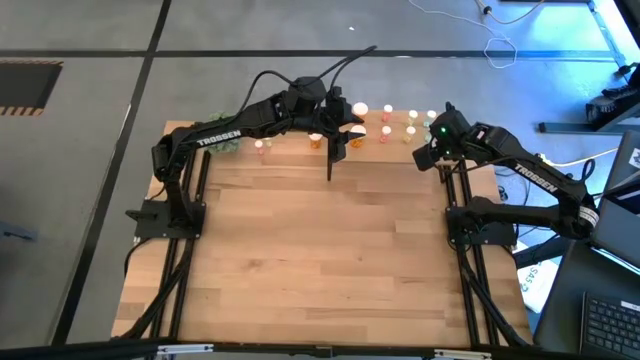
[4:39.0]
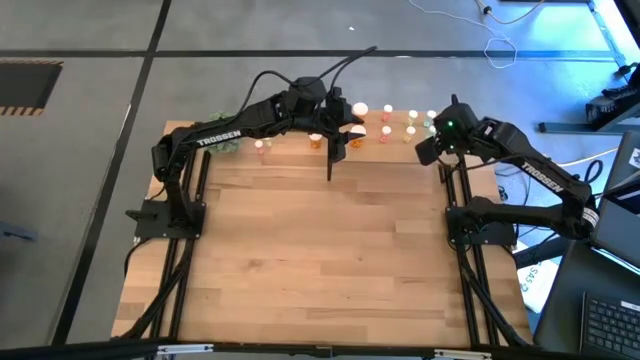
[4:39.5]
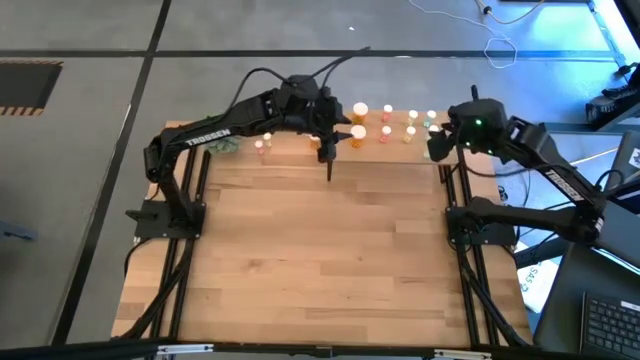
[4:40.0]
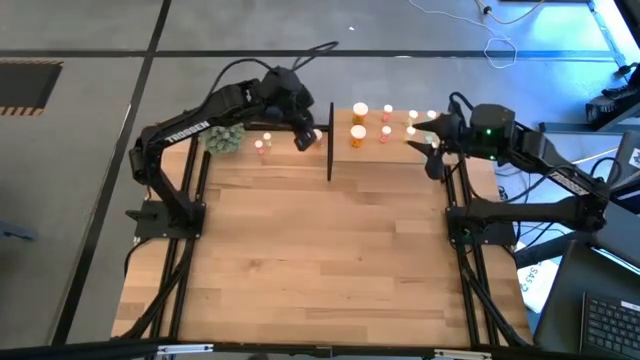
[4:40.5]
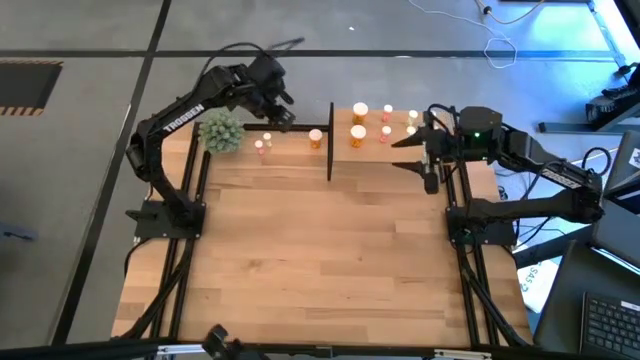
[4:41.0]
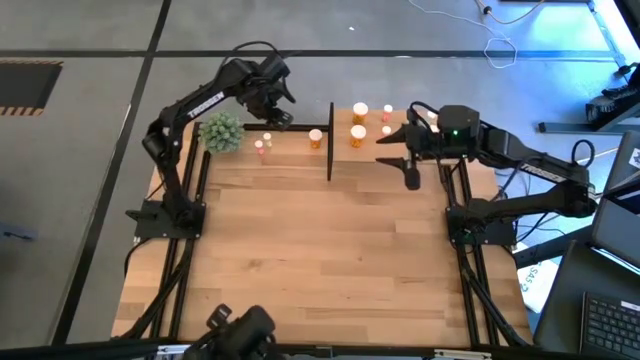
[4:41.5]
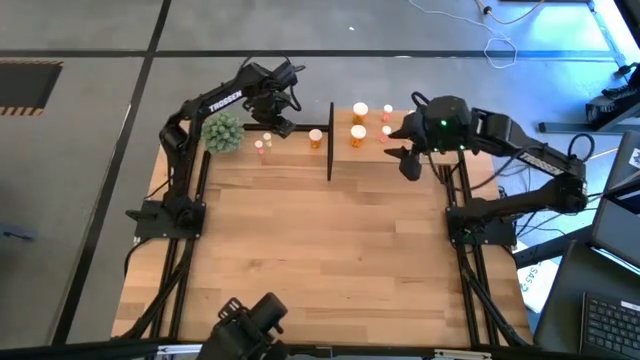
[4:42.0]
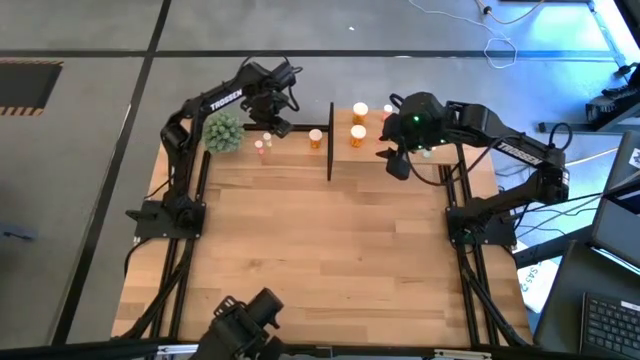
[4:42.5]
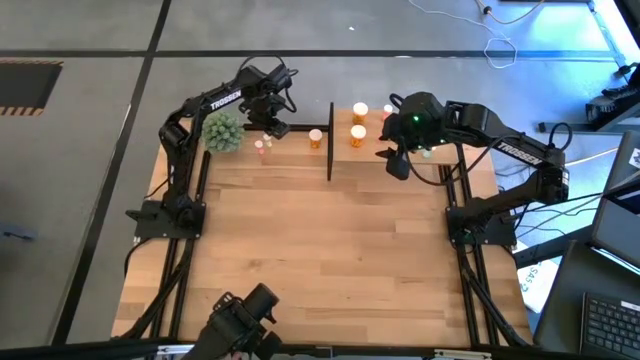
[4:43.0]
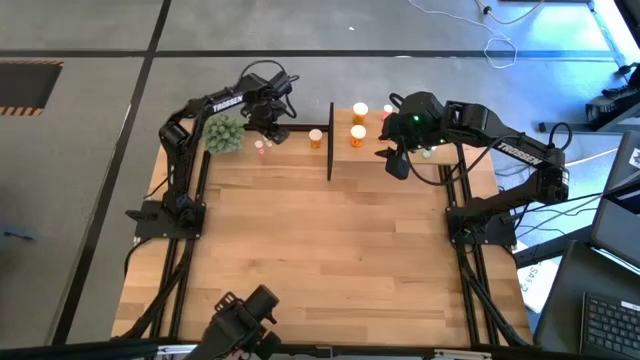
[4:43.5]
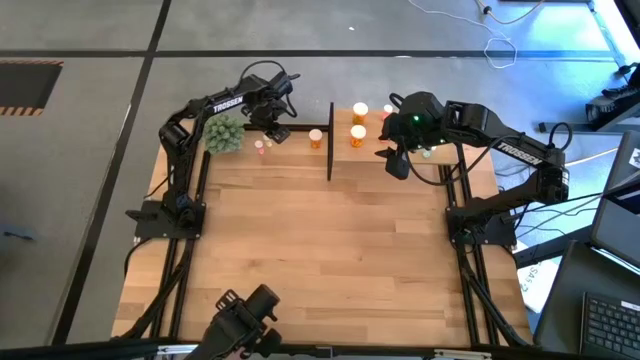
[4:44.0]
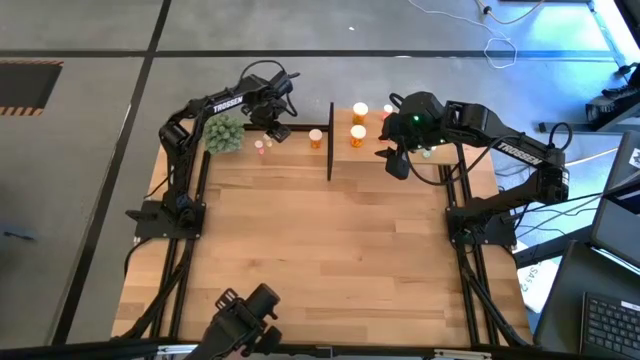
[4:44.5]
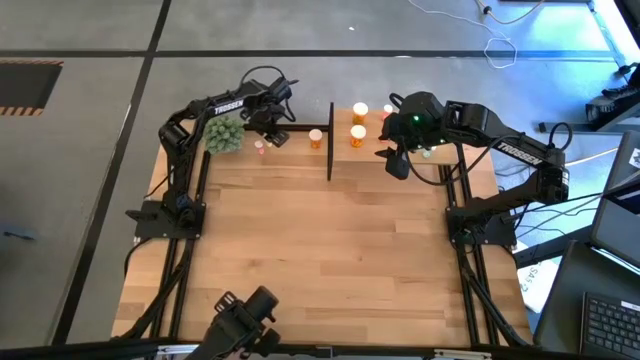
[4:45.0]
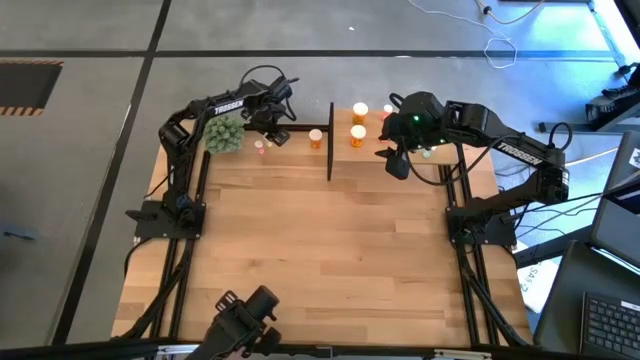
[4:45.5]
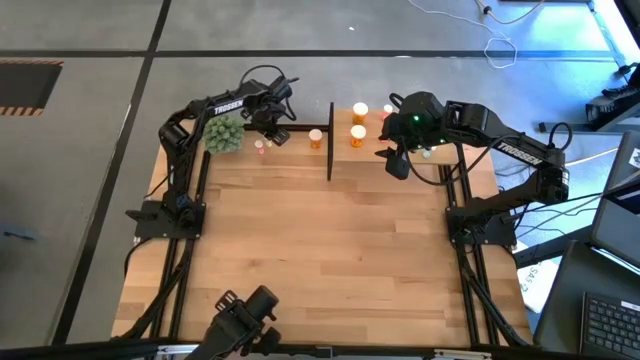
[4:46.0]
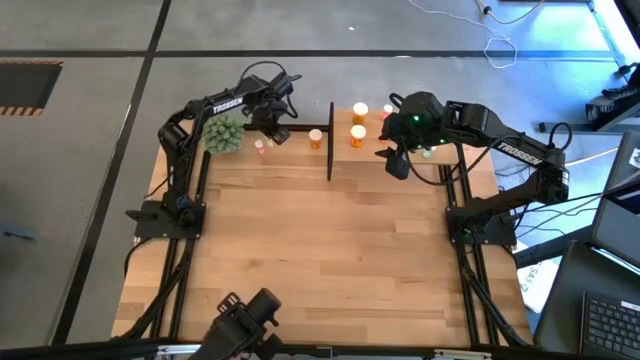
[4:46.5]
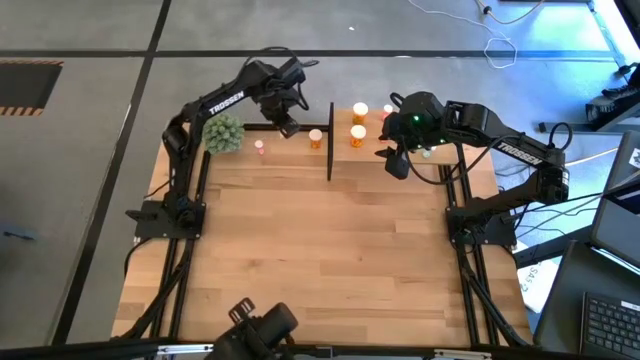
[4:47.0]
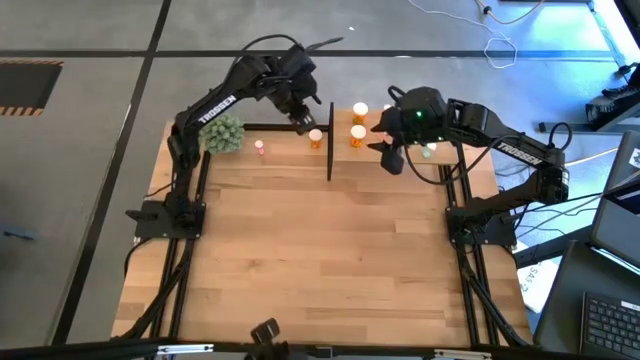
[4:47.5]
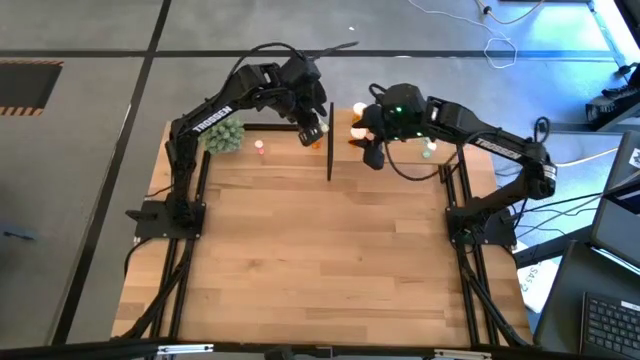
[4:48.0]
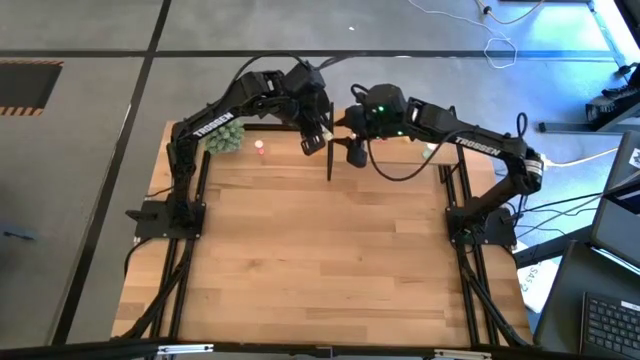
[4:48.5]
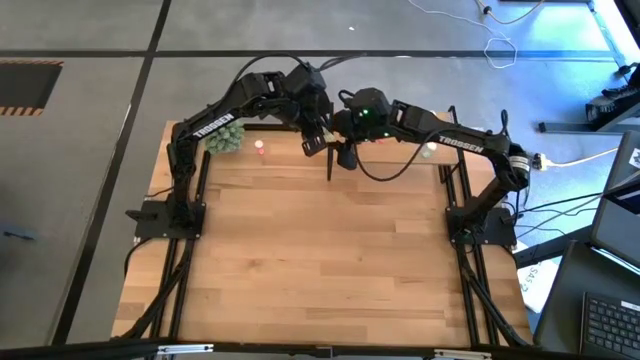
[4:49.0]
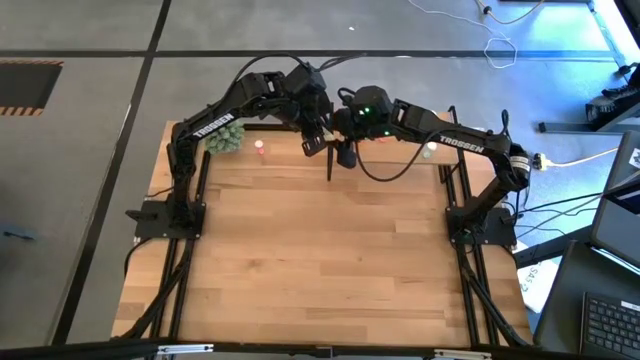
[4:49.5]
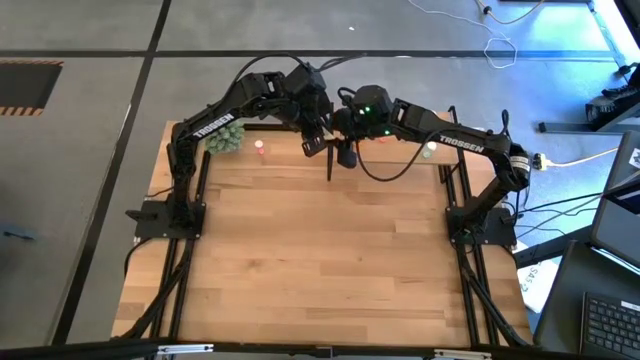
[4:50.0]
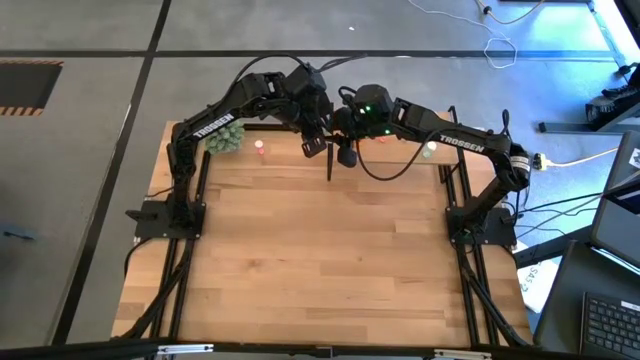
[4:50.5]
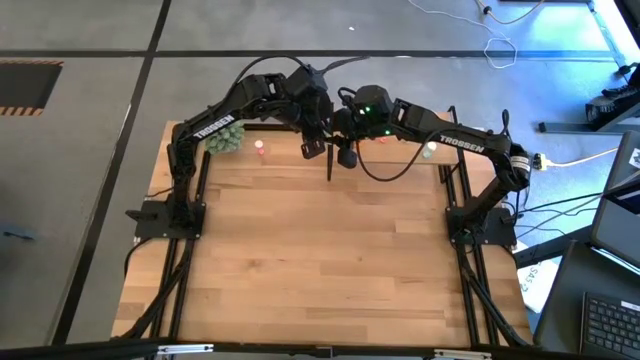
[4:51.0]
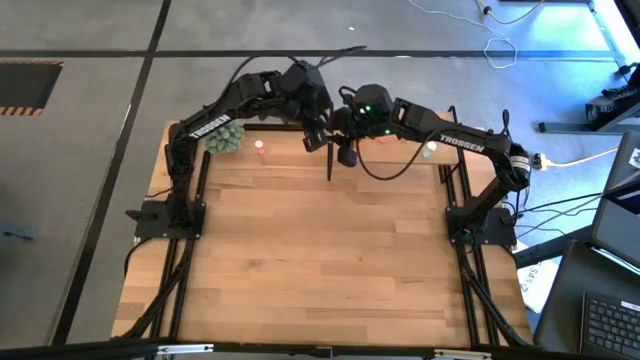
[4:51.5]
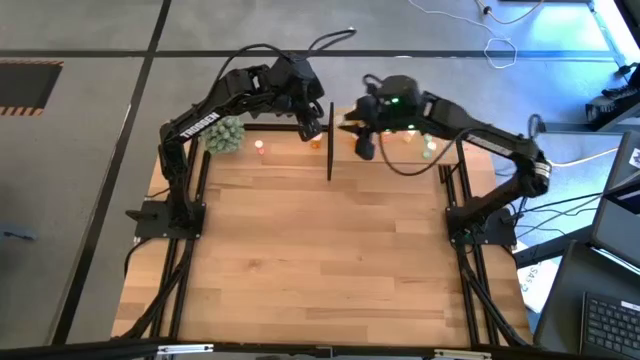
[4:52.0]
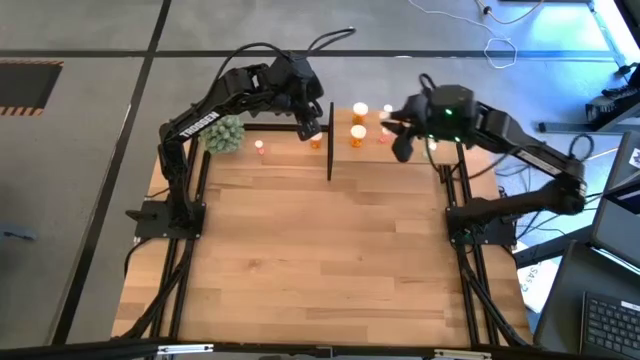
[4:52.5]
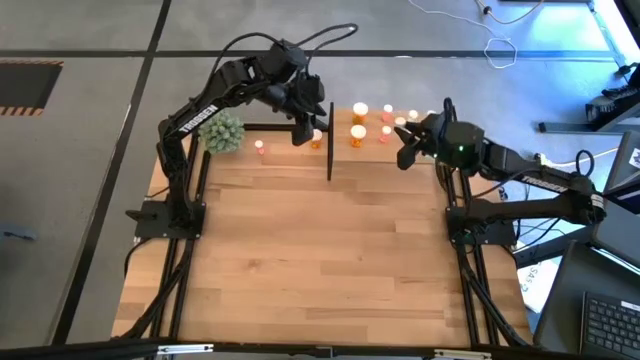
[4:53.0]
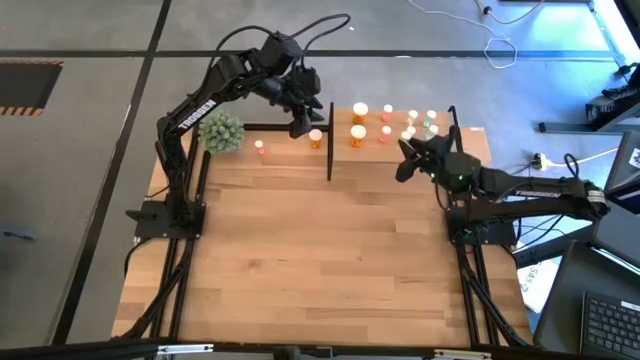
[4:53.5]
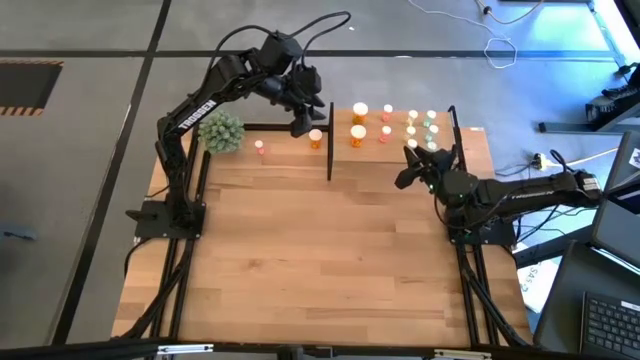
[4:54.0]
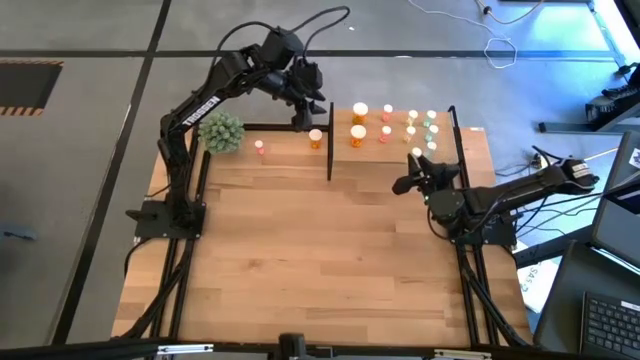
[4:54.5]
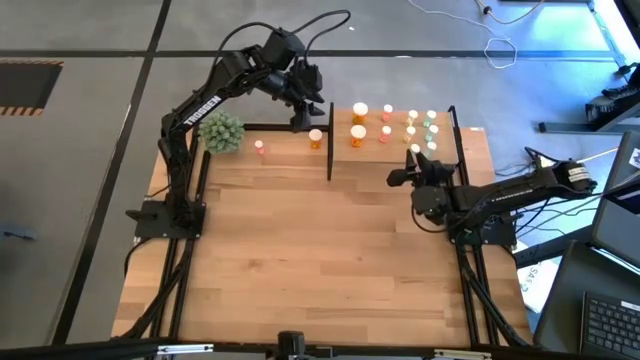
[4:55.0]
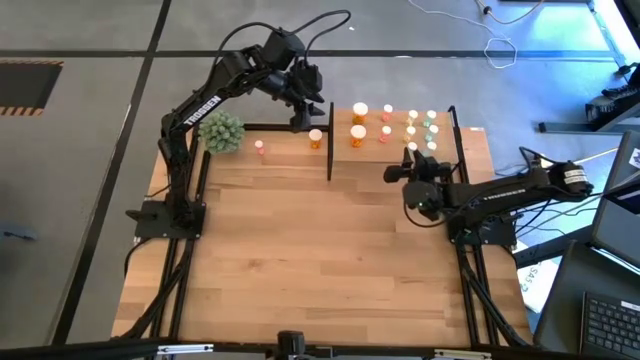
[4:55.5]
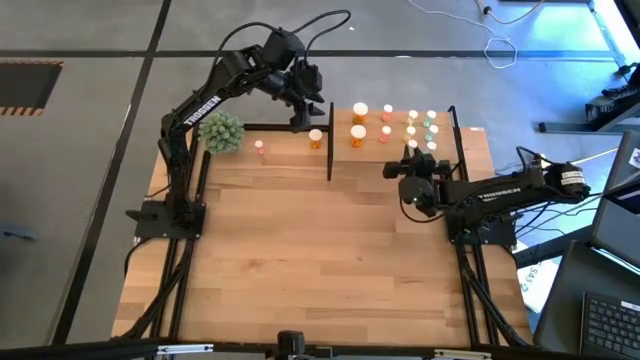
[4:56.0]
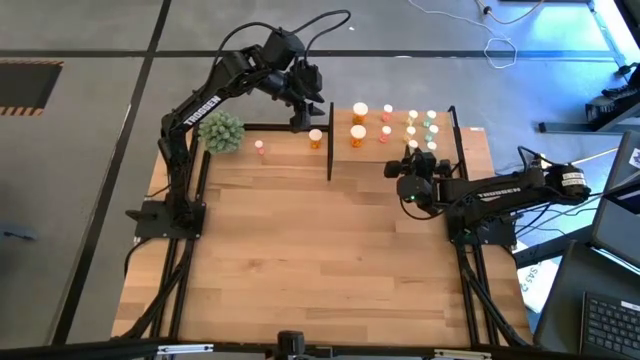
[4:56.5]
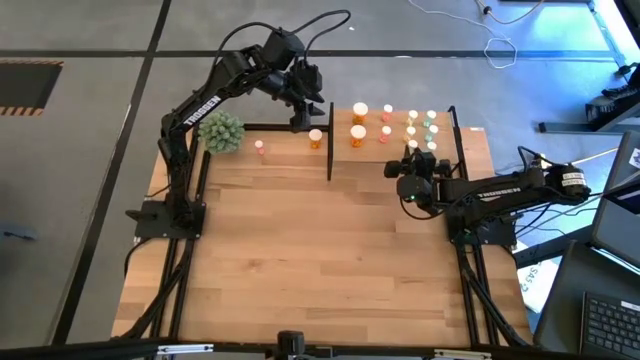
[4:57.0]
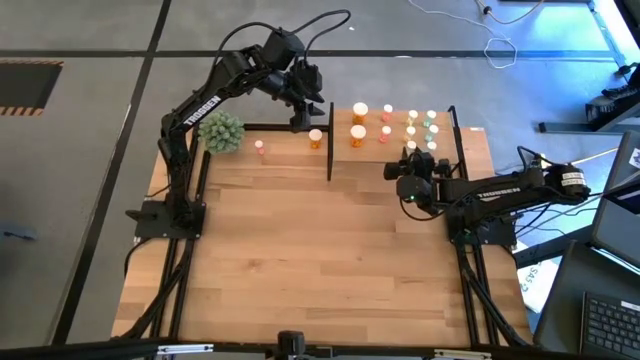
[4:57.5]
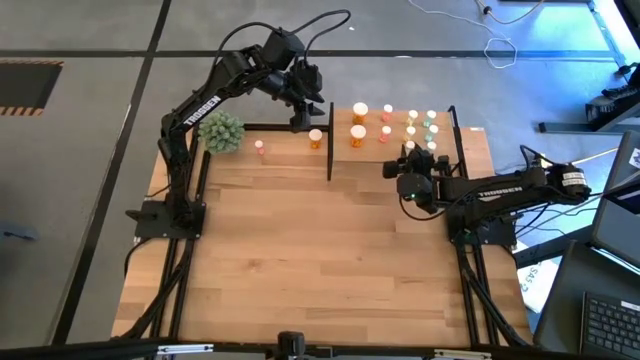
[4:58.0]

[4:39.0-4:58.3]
Task: Pick and place medicine bottles onto shelf by color
Put the yellow pill bottle on the shelf aligned with the yellow pill bottles

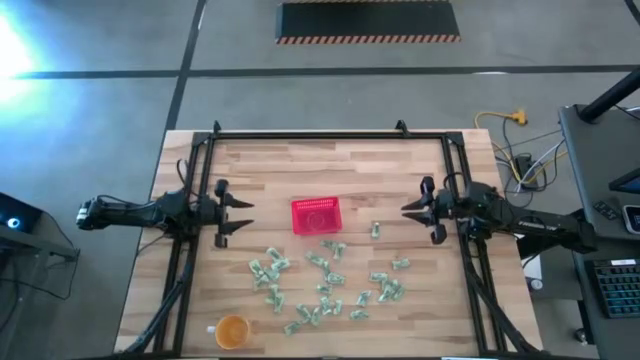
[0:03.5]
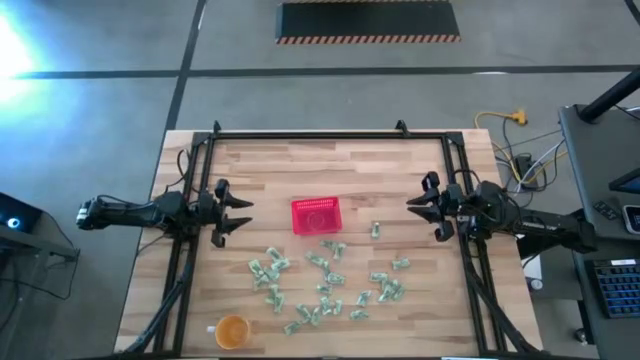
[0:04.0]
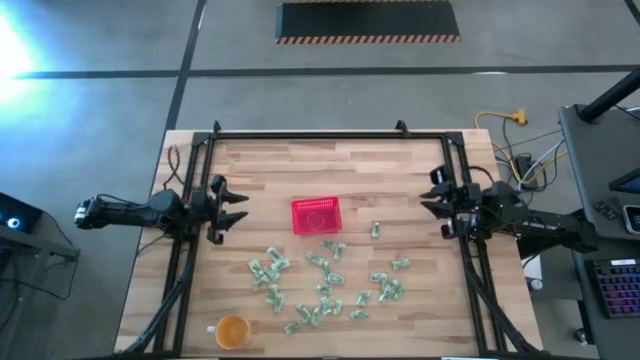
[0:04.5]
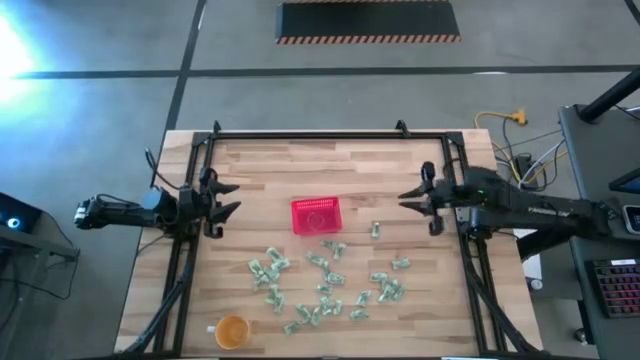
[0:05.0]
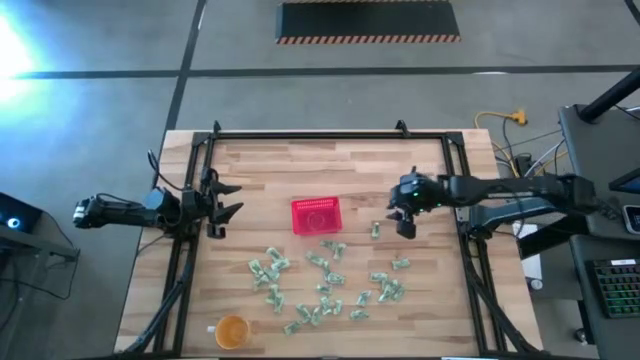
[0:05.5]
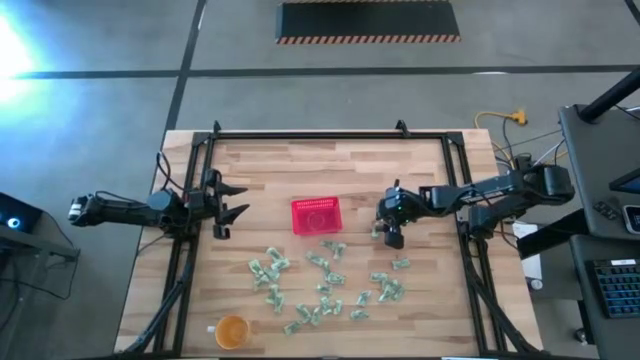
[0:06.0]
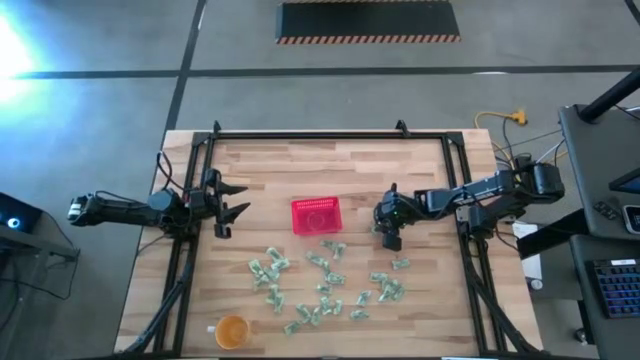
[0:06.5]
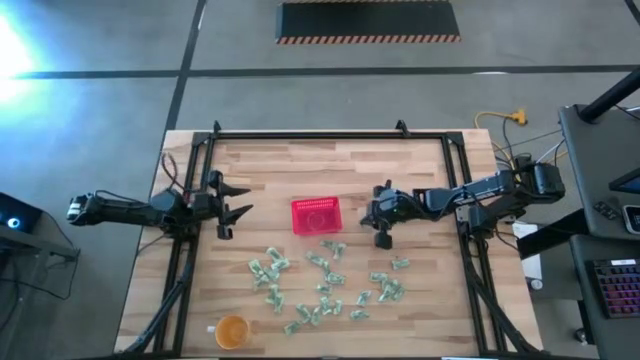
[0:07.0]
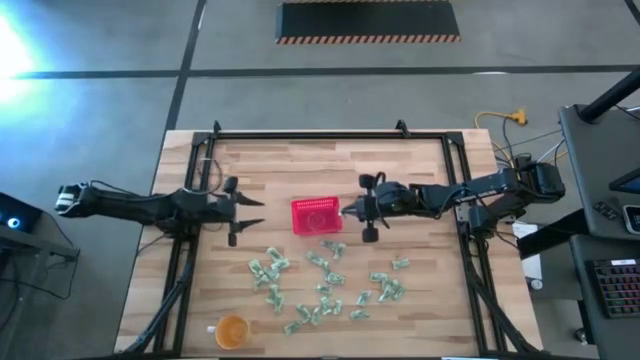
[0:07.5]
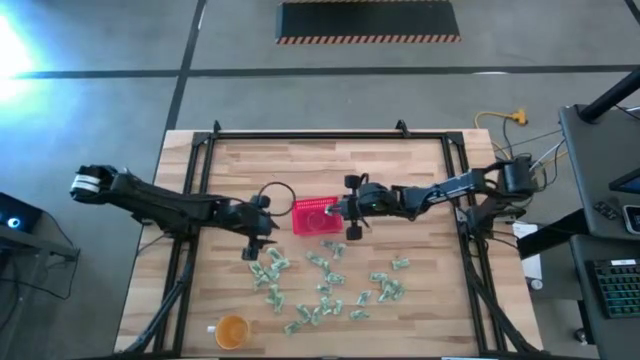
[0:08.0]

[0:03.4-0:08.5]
Task: Pick and place items into bin
Put the stevia packet into the red bin
